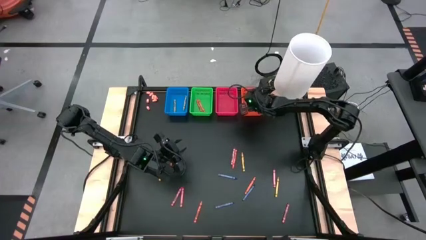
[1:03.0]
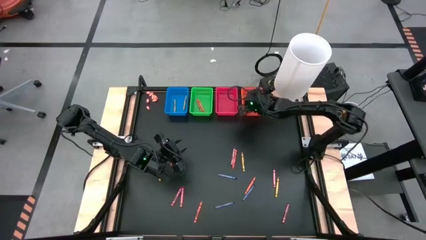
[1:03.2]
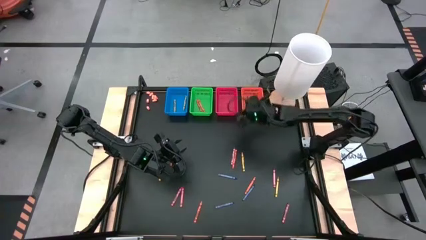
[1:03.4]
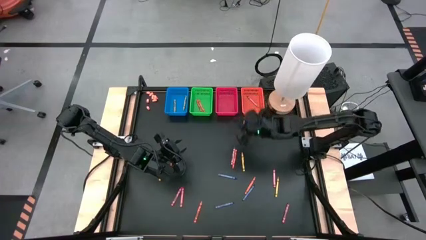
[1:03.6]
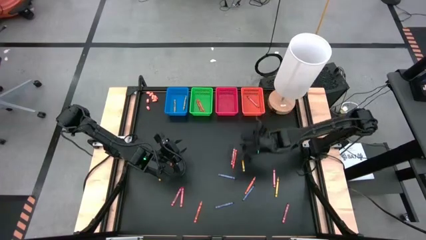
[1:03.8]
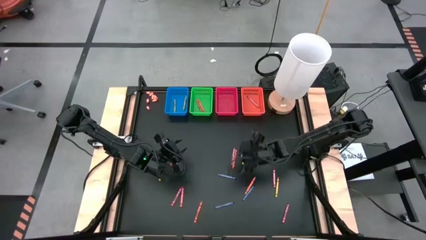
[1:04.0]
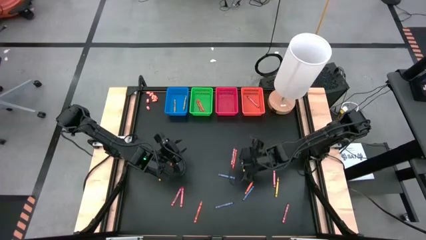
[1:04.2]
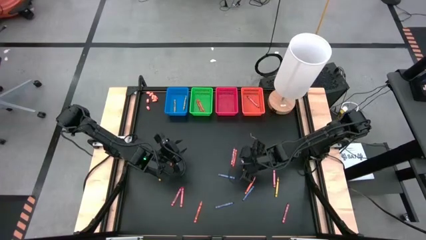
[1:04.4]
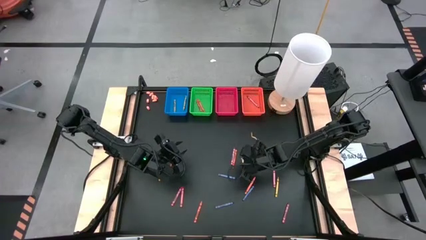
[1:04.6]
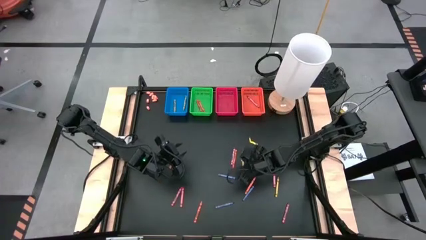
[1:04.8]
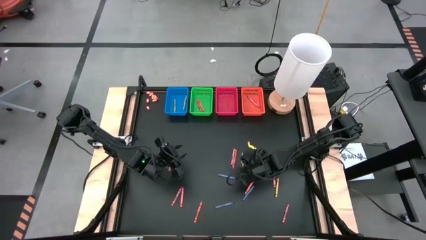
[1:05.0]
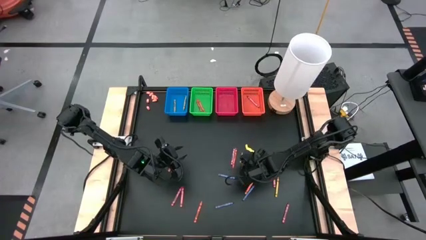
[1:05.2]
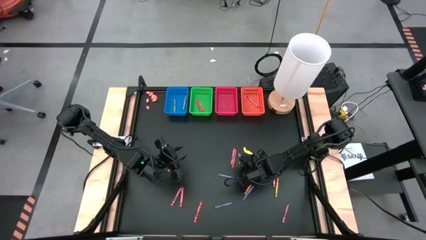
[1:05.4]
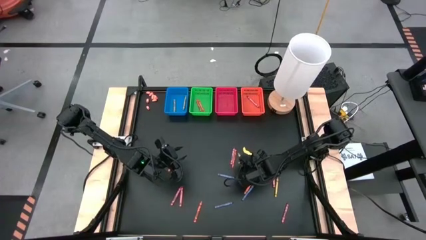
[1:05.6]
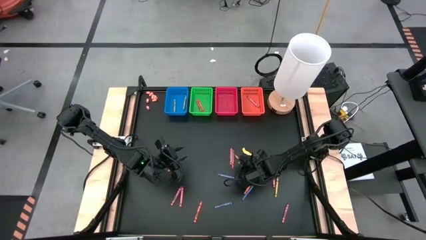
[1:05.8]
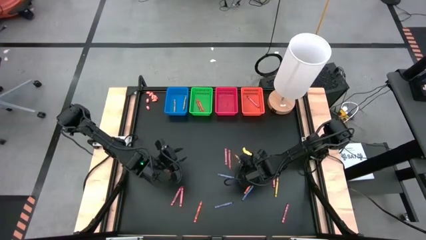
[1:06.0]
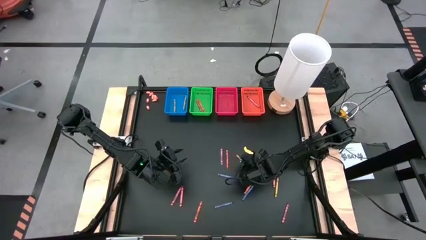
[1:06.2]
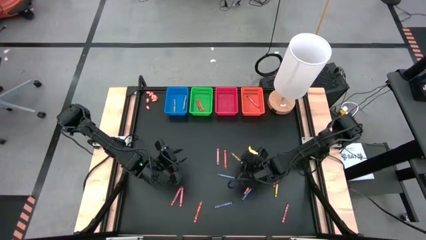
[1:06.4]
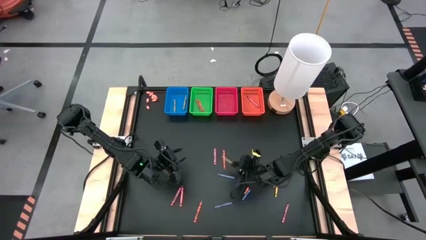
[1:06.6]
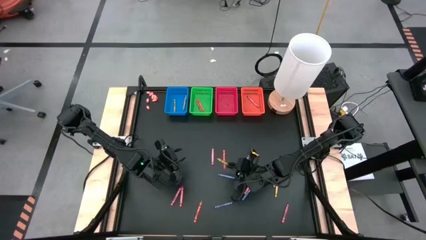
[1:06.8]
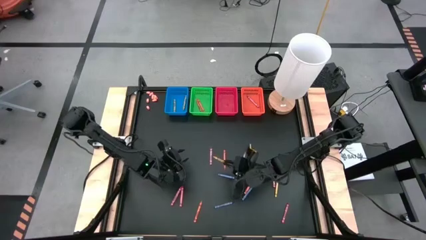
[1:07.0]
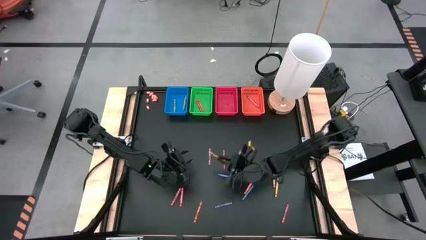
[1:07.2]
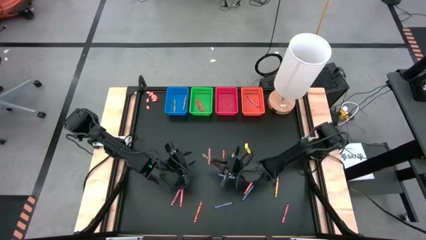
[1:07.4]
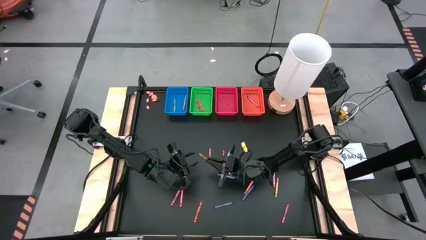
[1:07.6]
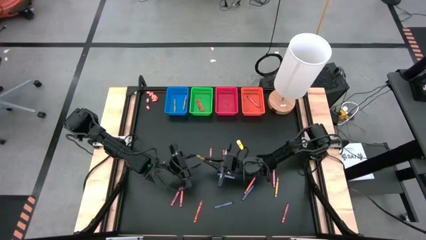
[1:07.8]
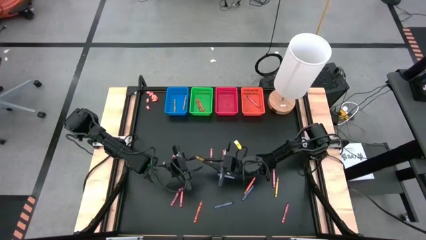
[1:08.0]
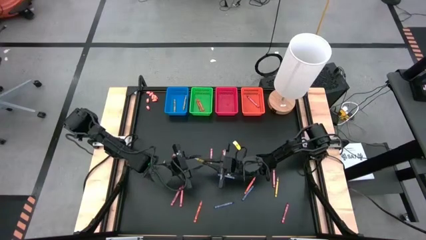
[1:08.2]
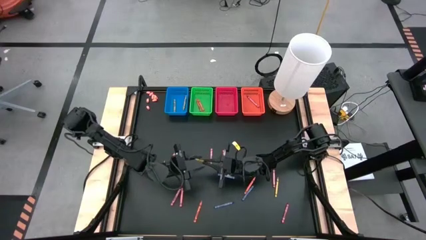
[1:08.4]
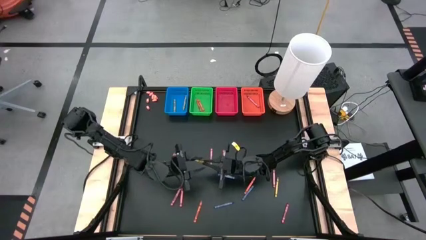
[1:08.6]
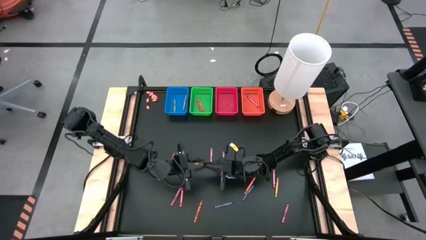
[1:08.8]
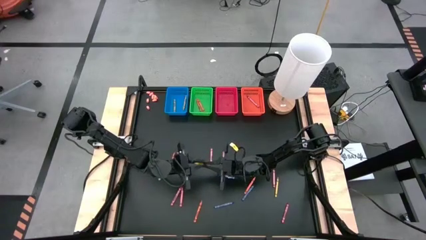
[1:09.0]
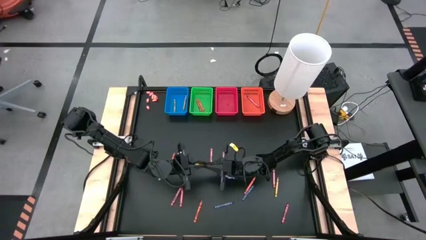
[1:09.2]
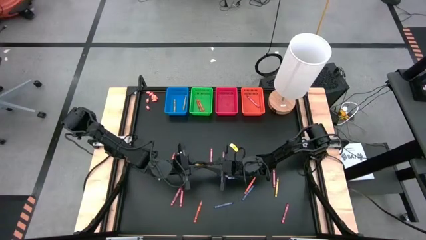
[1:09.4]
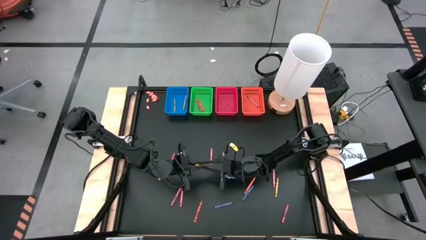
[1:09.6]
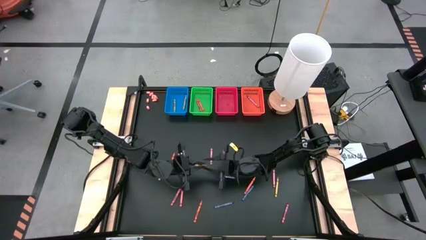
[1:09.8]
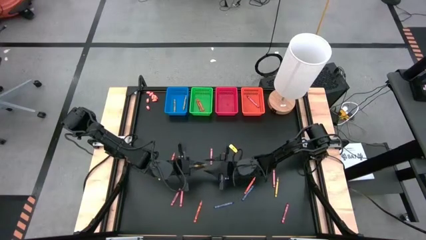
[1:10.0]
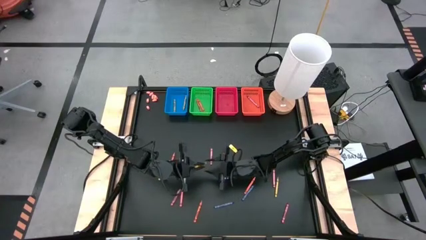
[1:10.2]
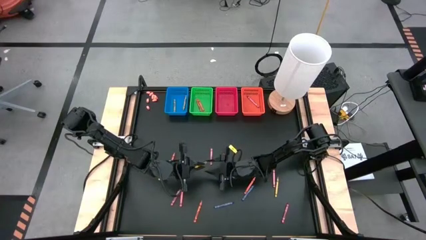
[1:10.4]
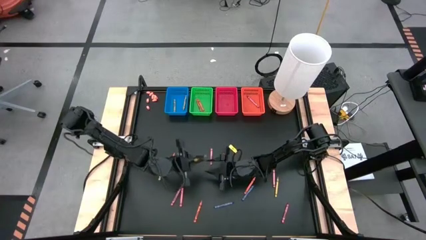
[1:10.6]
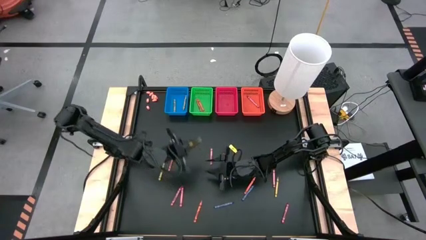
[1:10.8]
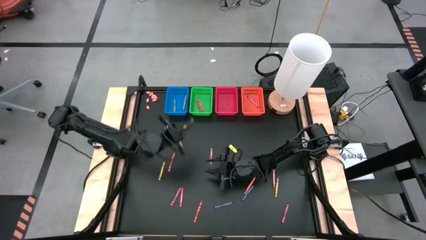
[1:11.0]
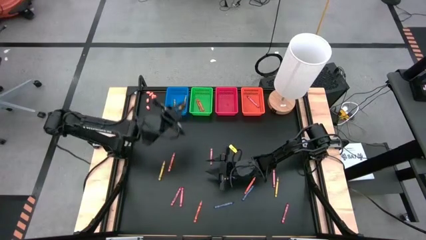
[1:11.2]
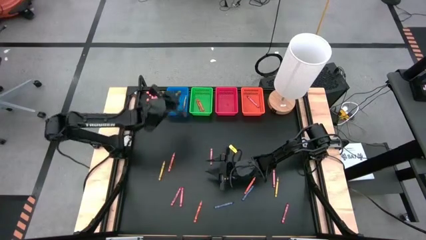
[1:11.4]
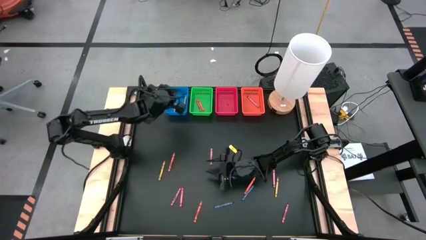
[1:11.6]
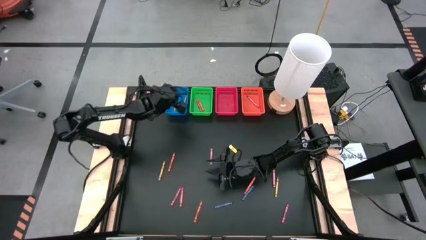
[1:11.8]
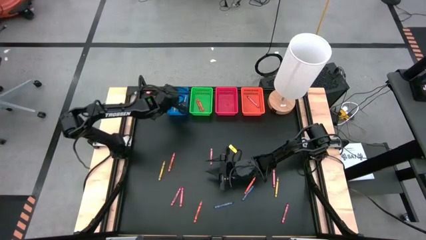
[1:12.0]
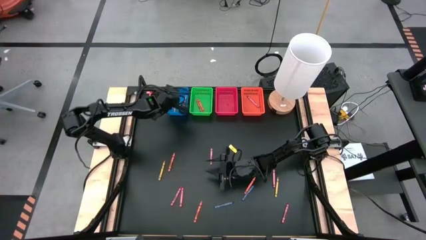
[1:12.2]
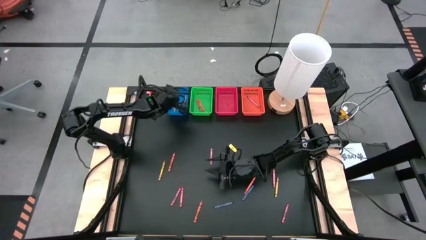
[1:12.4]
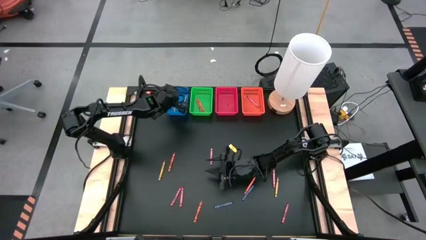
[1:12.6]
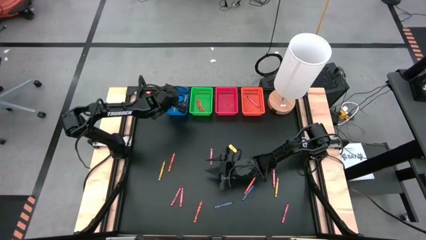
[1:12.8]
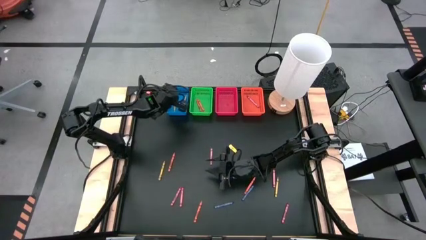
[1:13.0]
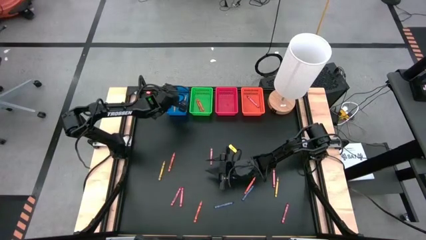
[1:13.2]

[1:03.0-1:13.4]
Task: Sort crayons
Put the yellow crayon into the blue bin

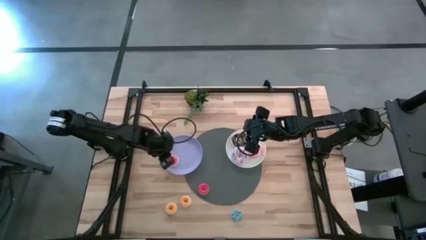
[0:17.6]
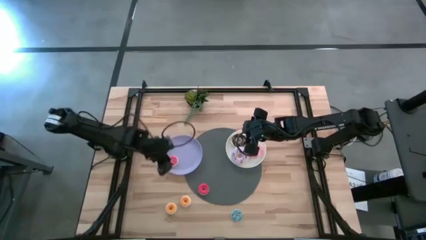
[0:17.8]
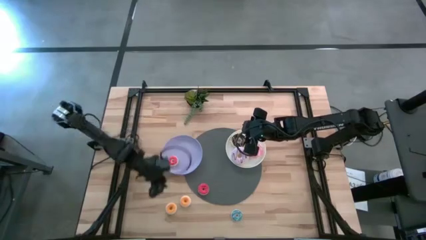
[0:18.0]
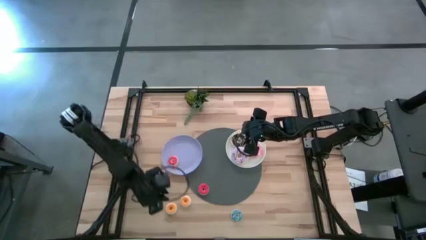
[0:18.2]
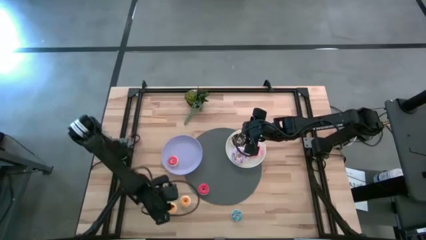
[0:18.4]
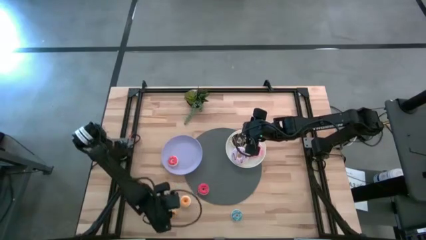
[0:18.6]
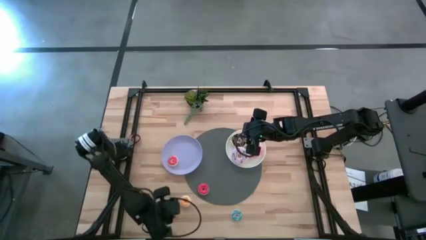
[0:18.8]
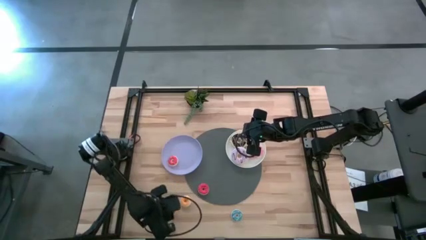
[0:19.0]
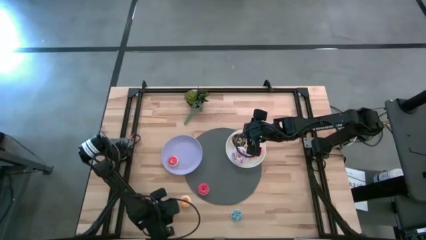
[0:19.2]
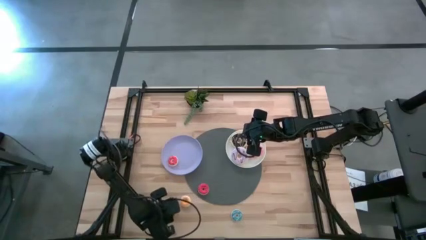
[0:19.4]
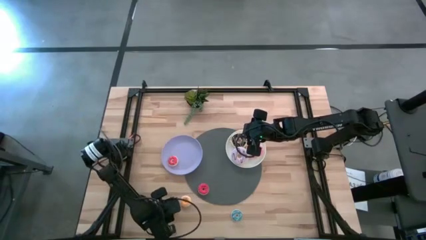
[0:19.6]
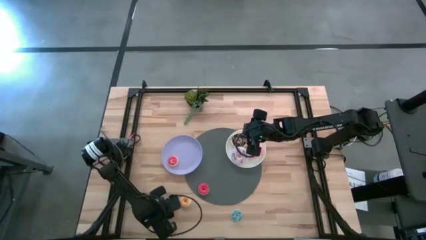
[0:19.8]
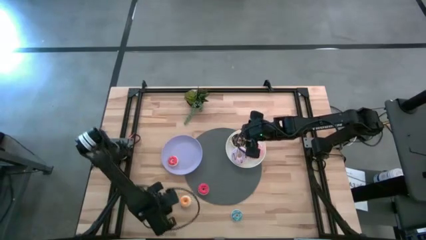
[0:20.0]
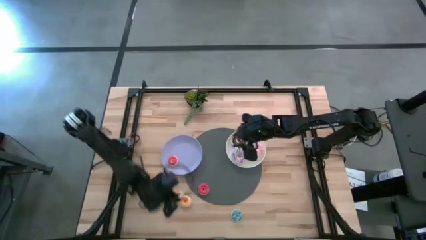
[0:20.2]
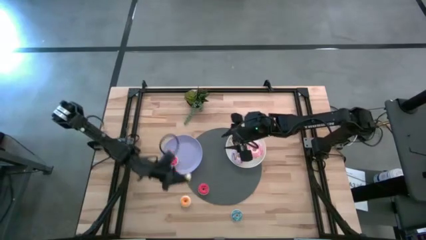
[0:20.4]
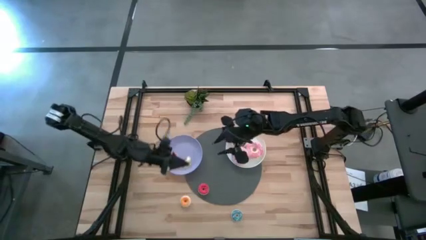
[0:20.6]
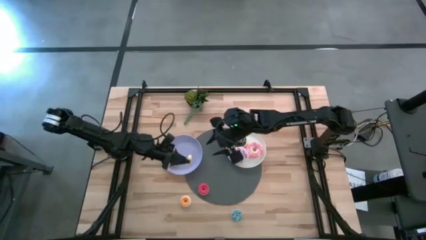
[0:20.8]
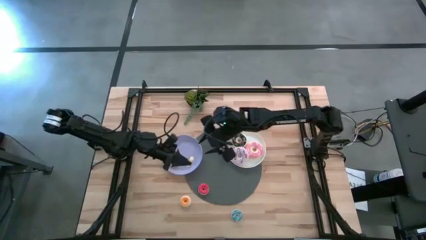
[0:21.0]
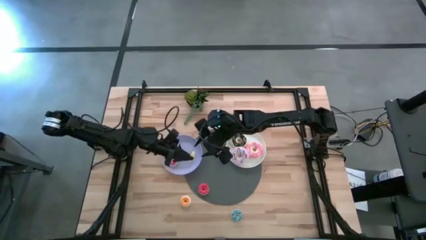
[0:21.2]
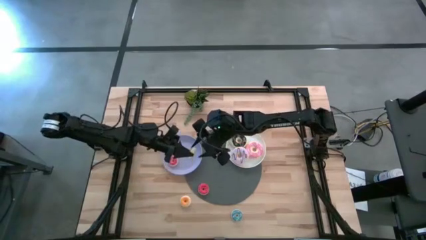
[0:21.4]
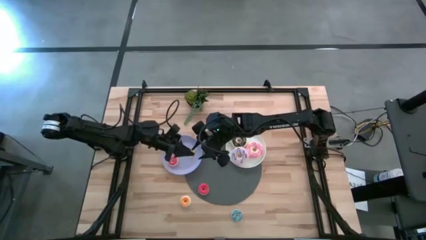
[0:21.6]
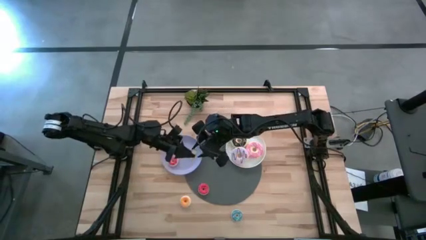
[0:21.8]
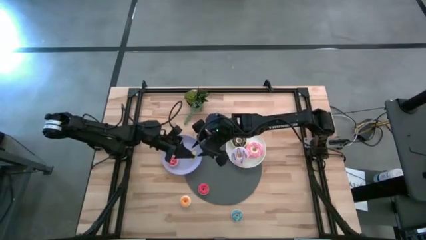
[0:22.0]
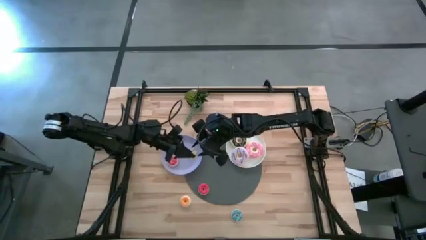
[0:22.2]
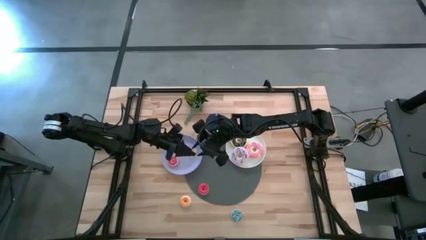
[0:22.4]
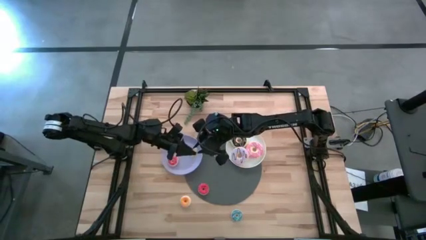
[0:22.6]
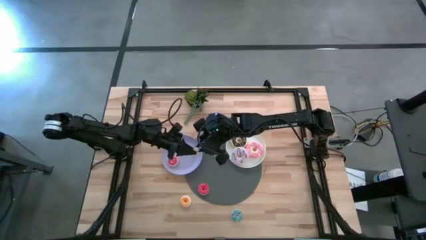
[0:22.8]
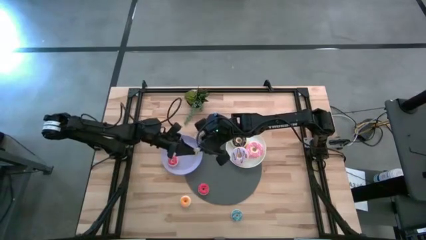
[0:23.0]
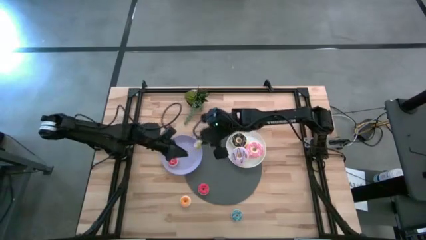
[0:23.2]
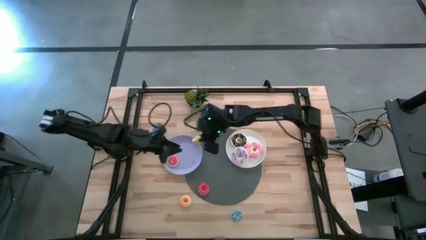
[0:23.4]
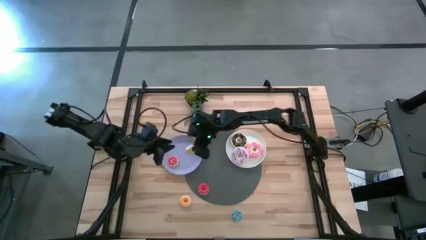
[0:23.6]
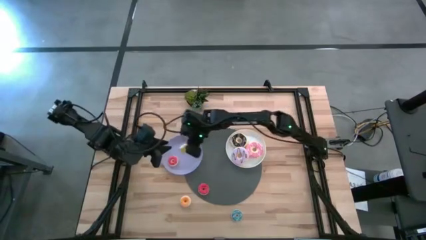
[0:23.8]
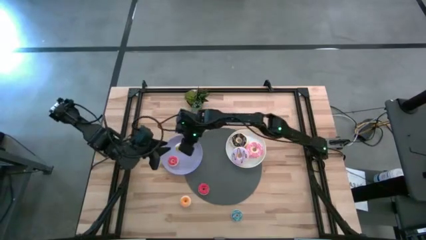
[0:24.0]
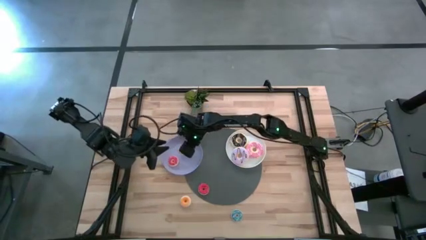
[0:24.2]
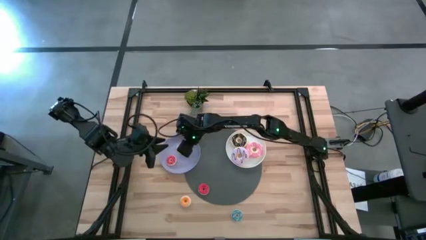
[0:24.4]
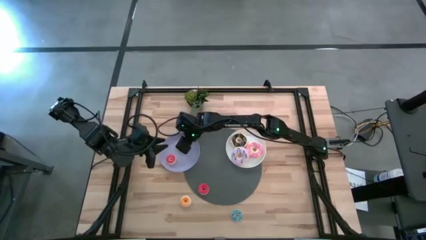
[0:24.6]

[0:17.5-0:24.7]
Task: Pick & Place donuts
Put the small yellow donut on the purple plate
